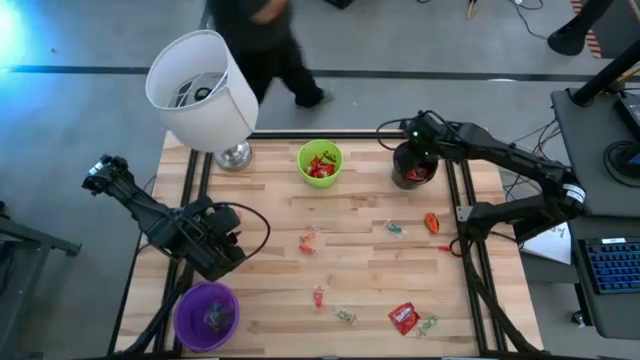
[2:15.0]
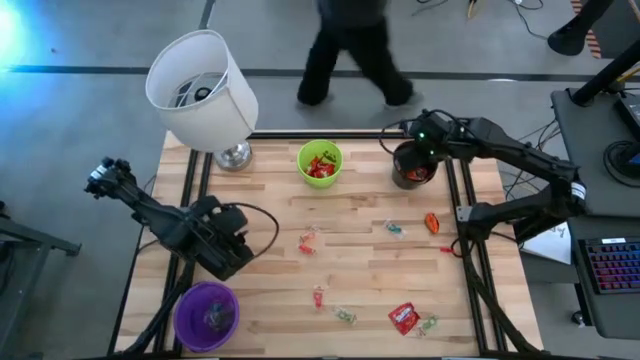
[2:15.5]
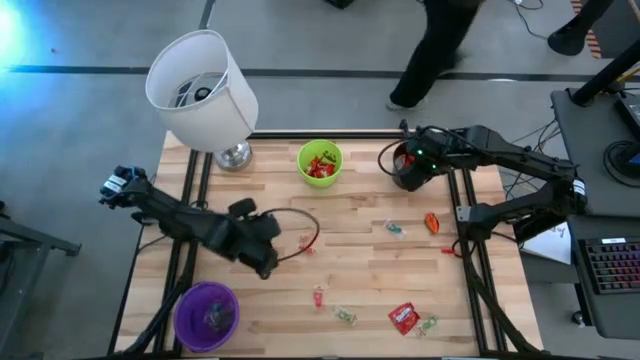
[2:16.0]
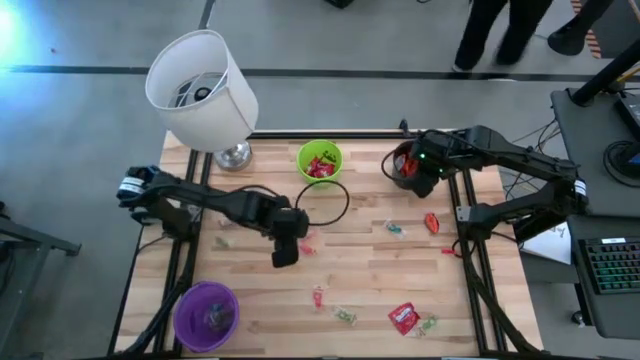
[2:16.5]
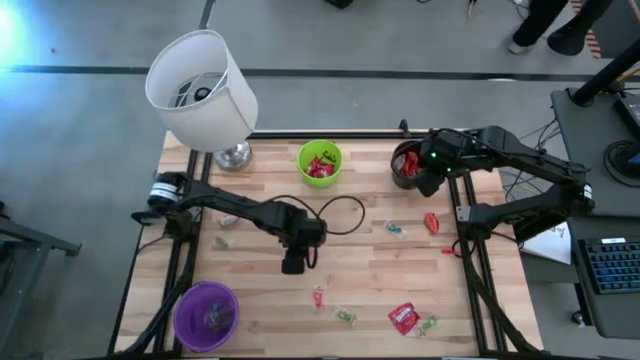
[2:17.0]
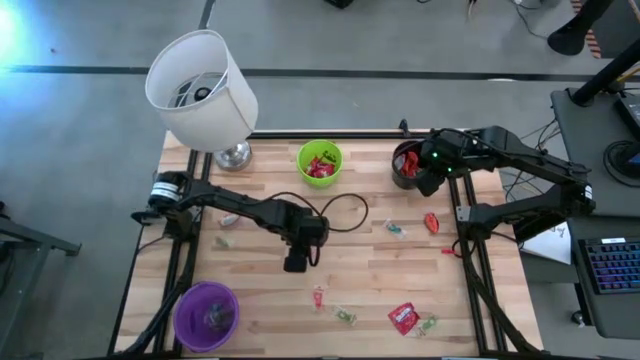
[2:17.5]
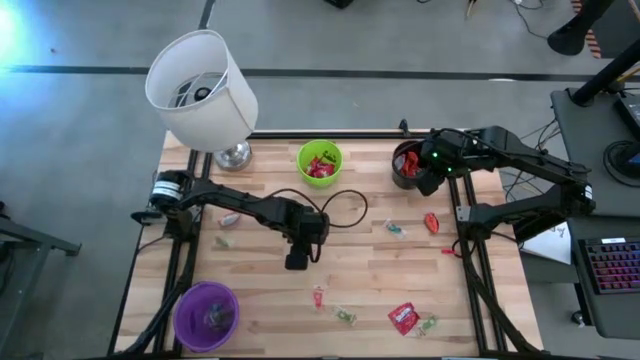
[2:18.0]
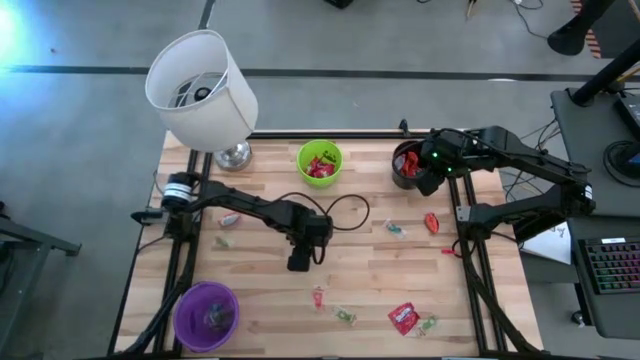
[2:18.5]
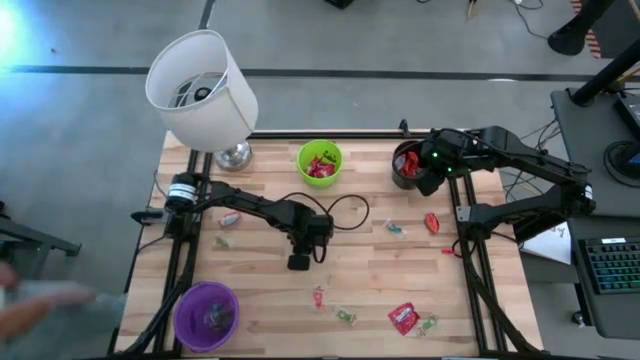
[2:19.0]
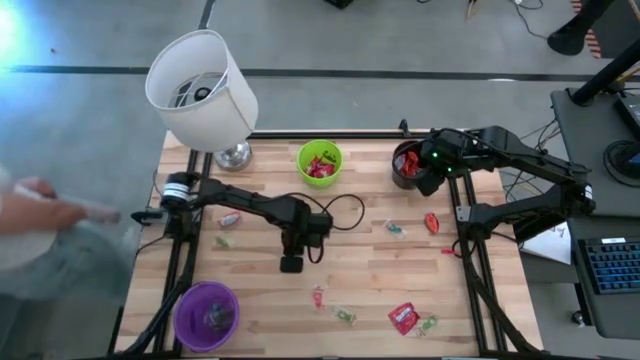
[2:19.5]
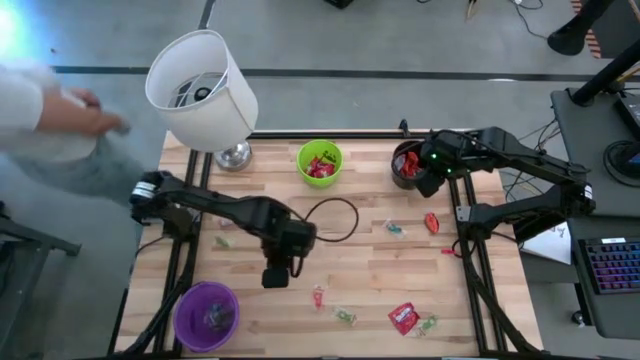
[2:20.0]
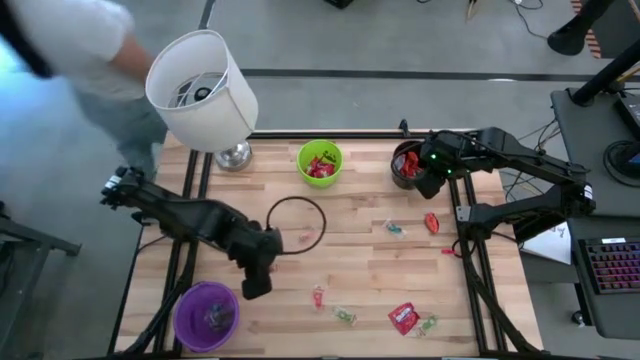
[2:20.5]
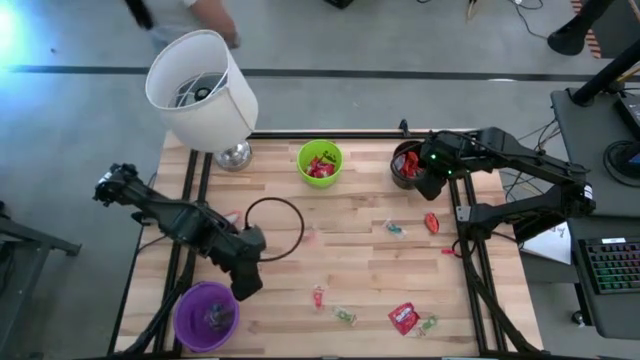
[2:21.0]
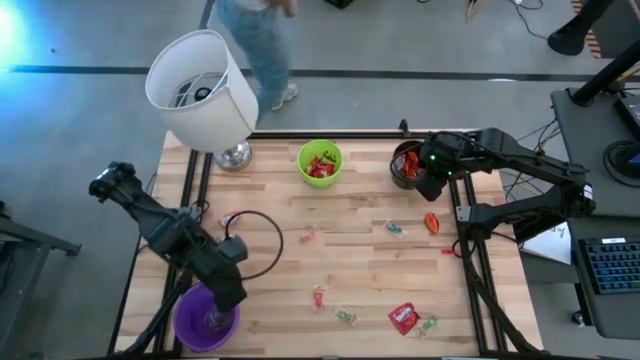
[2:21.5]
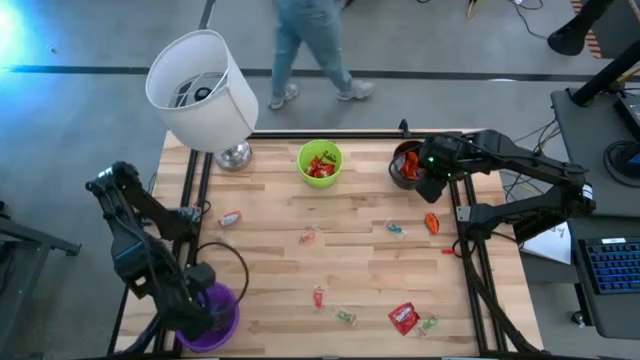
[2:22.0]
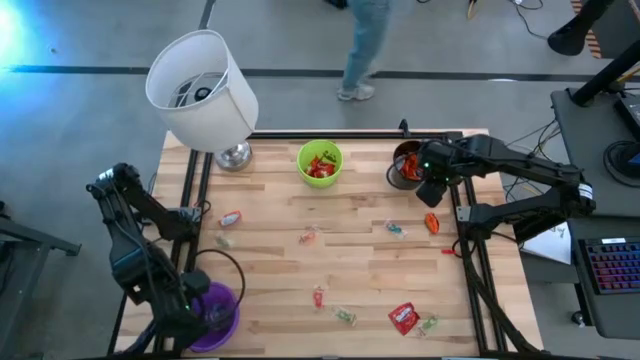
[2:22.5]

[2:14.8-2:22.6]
Task: Sort candy
Put the red gummy candy into the violet bucket

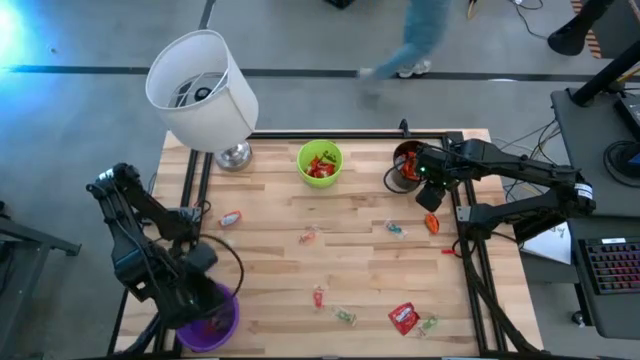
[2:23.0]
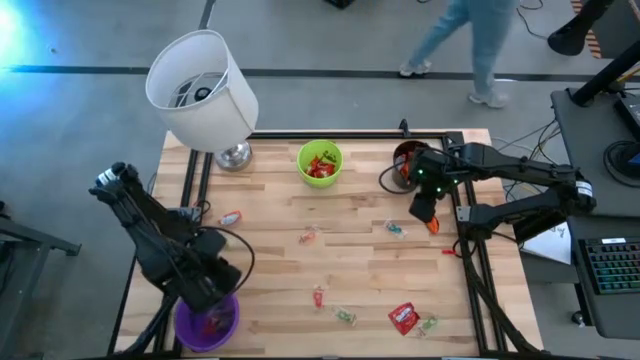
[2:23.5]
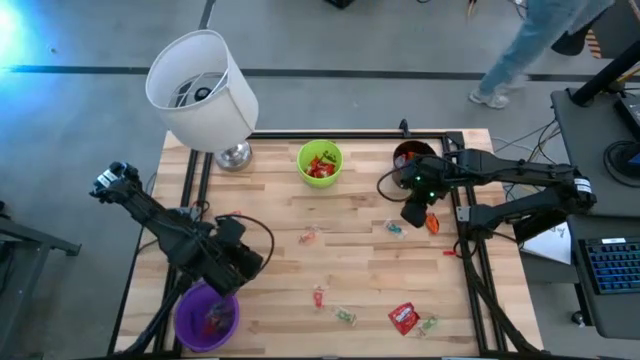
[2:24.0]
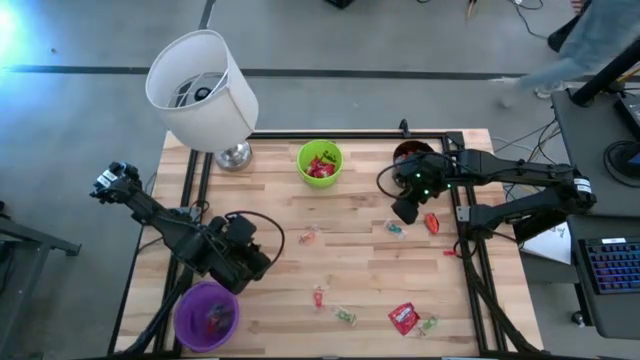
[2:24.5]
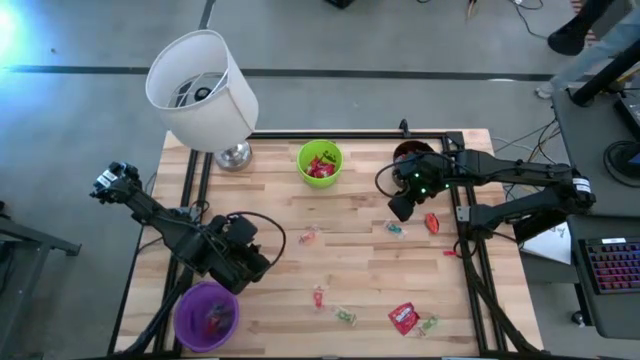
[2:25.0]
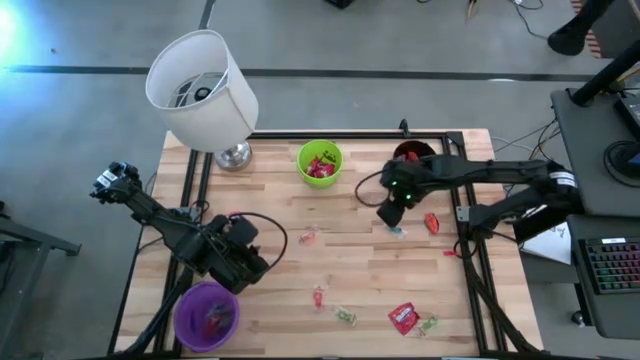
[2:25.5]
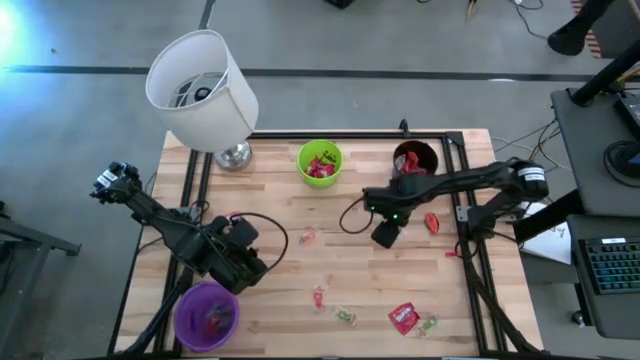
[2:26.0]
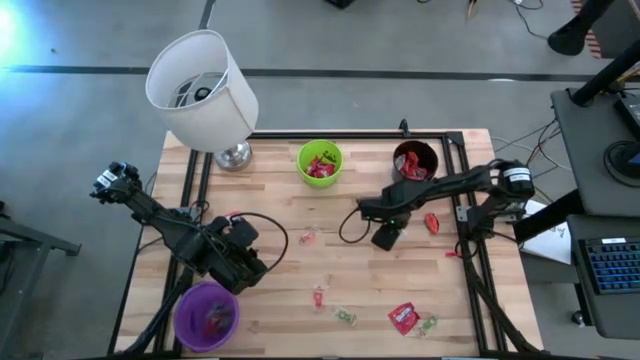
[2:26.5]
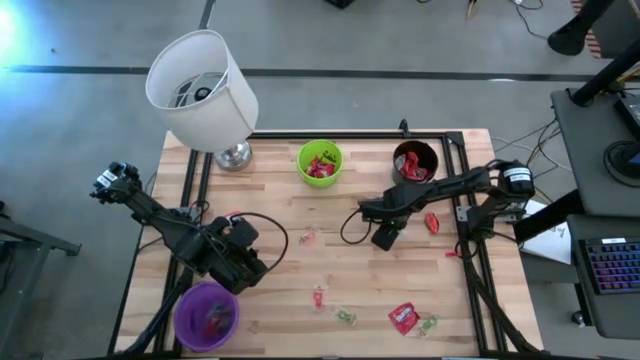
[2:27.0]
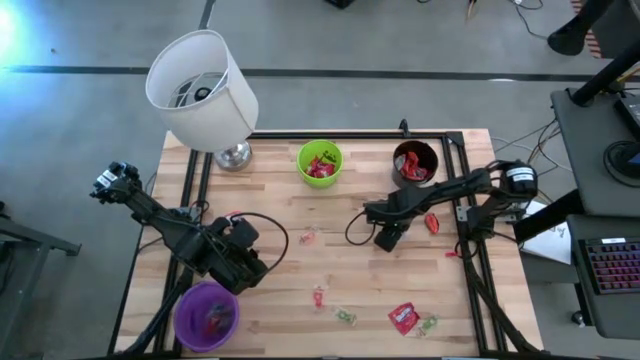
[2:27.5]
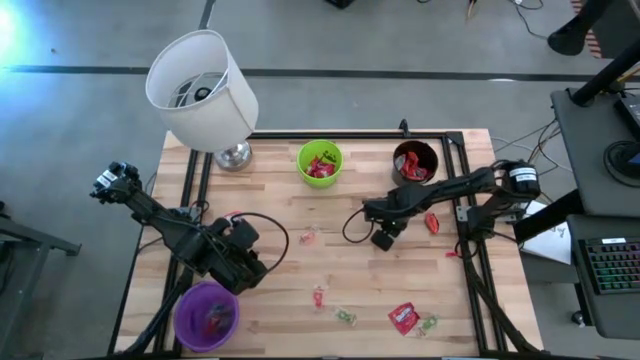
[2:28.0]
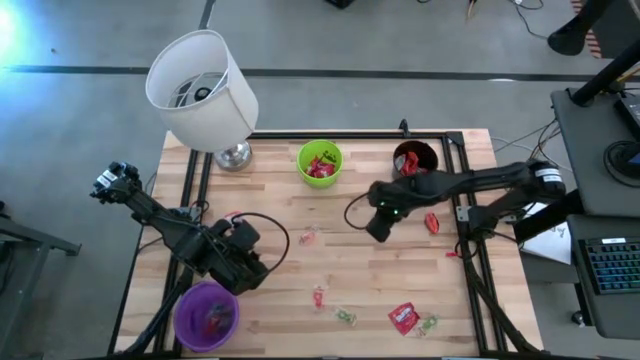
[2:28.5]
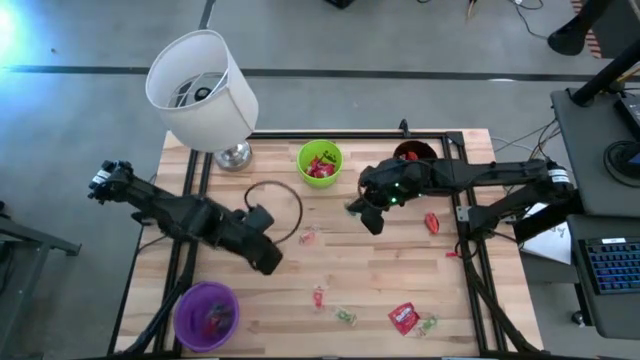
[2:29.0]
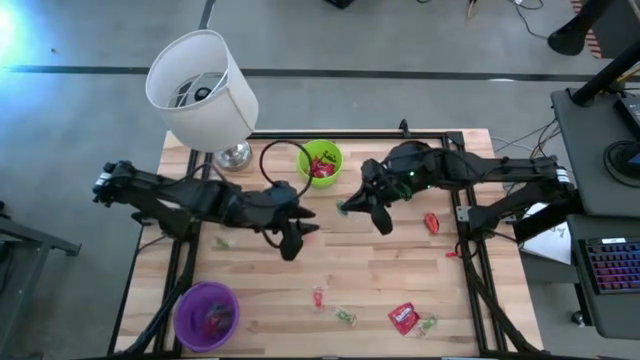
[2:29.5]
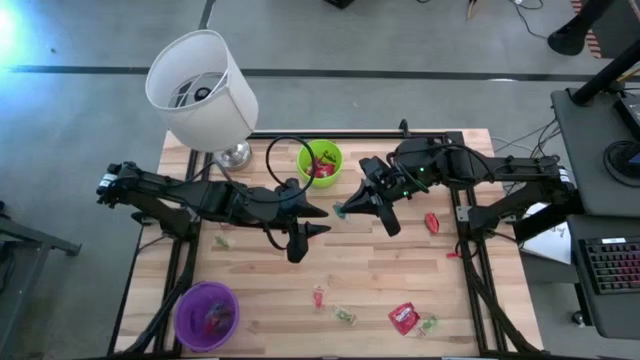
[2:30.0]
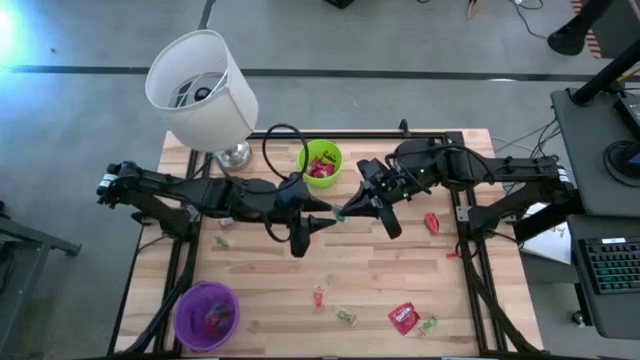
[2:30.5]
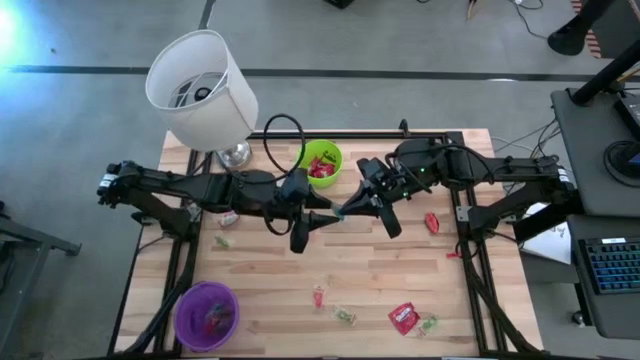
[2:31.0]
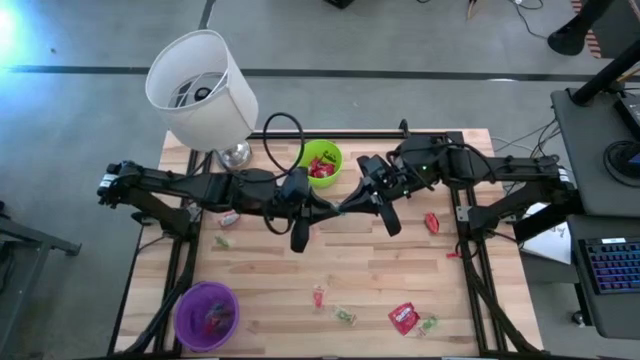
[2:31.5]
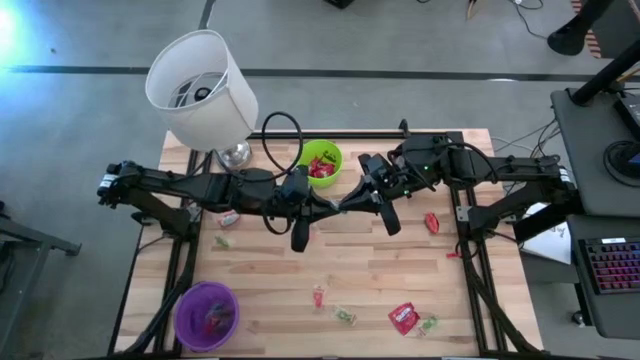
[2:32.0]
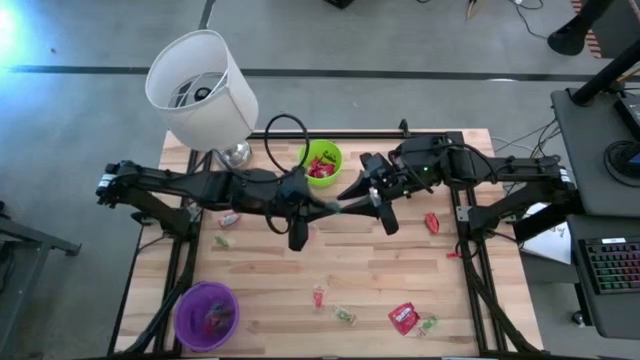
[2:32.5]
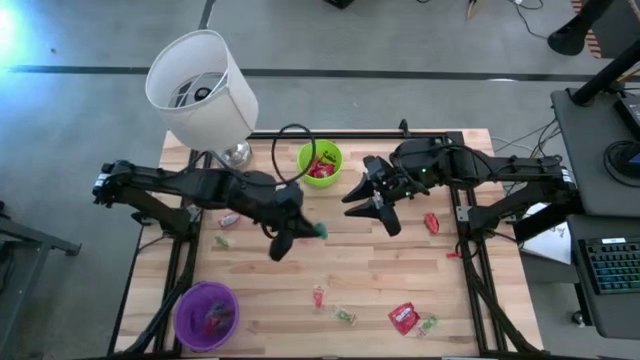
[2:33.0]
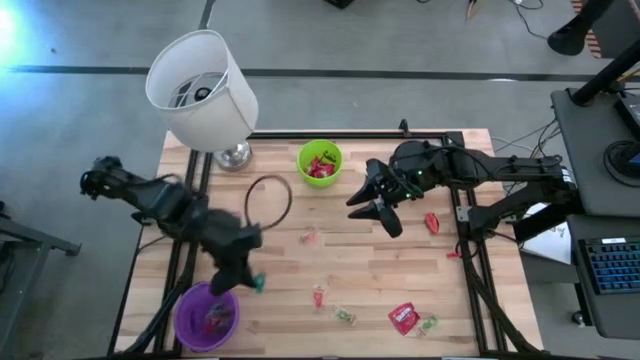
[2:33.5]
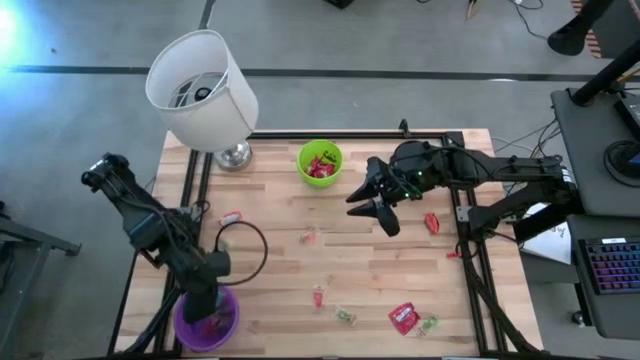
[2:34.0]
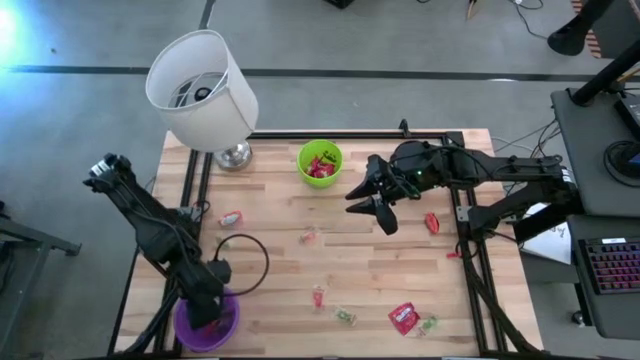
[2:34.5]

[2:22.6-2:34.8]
Put the blue gummy candy into the violet bucket

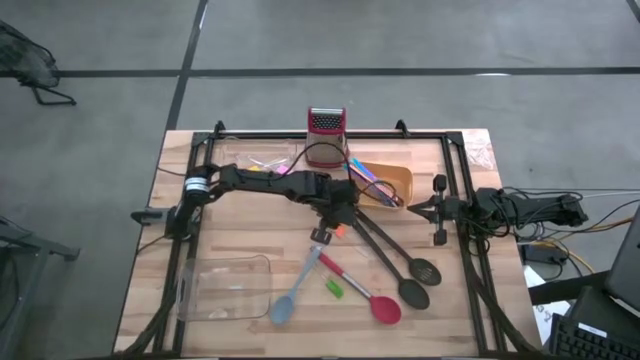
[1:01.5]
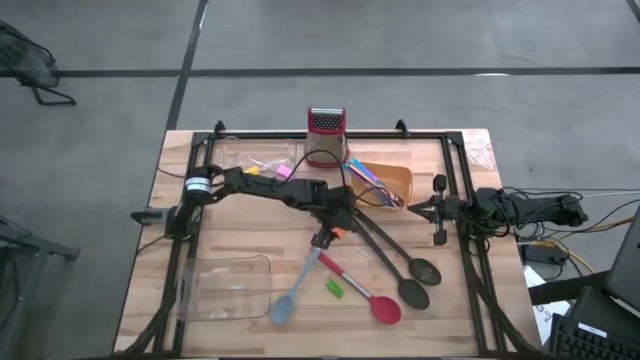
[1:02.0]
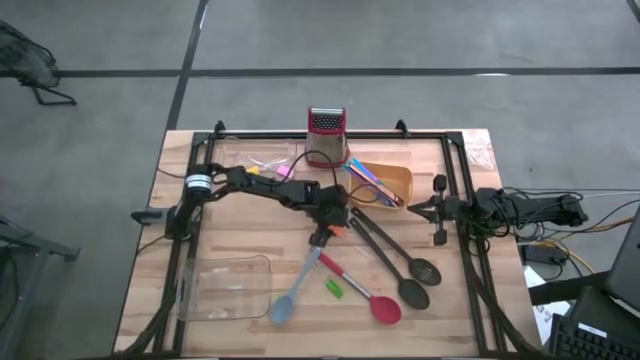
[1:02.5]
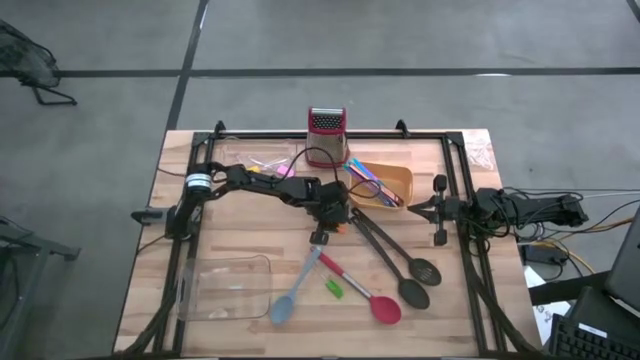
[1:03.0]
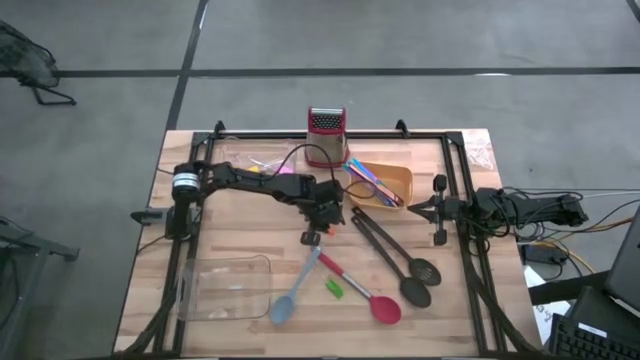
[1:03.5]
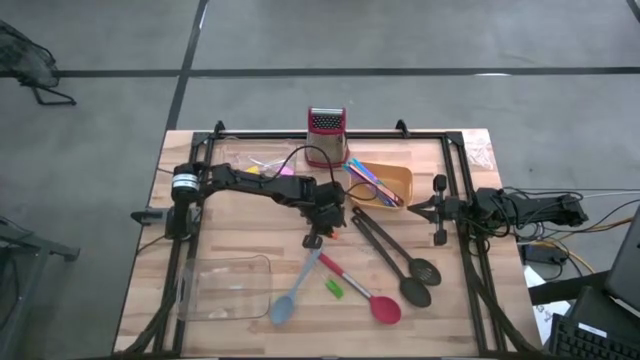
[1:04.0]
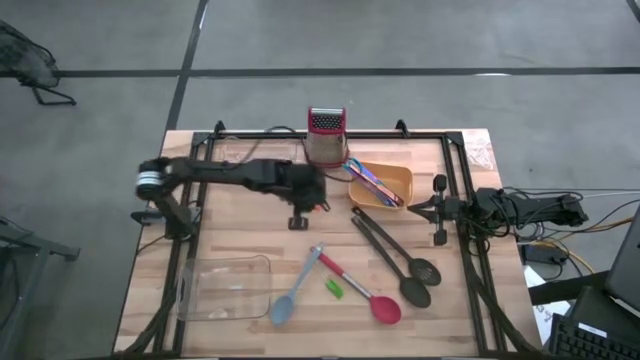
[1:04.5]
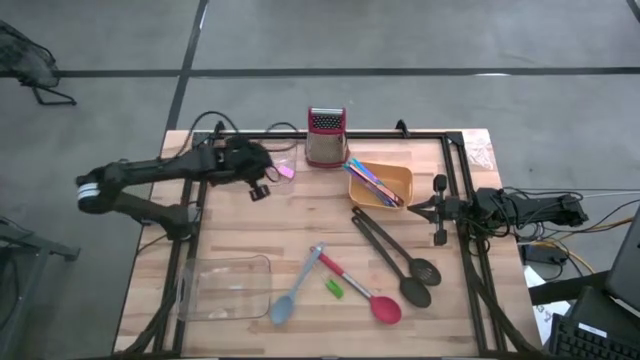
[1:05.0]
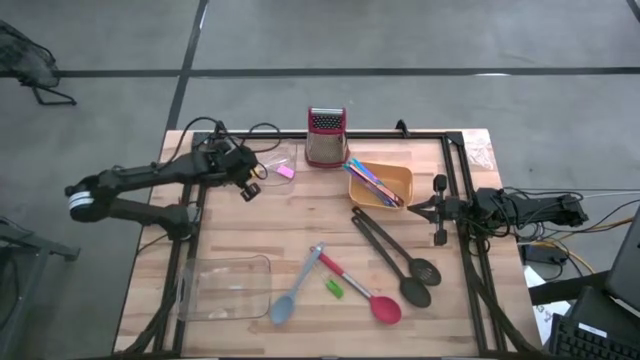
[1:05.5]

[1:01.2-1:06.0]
Task: Pick & Place Kitchen Items
Put the orange spatula into the top transparent bin
